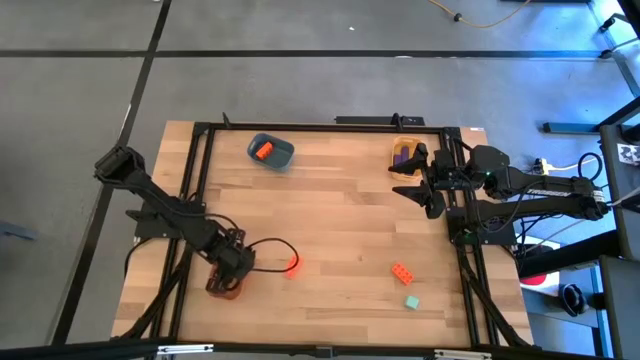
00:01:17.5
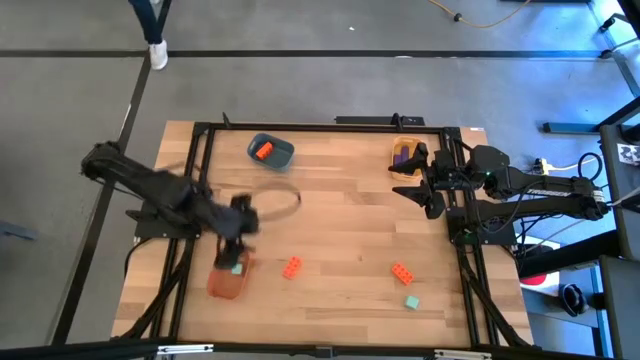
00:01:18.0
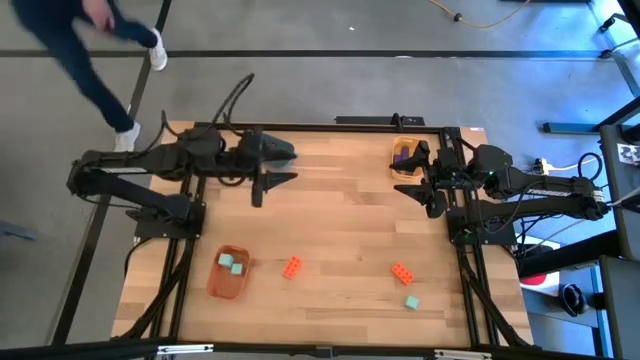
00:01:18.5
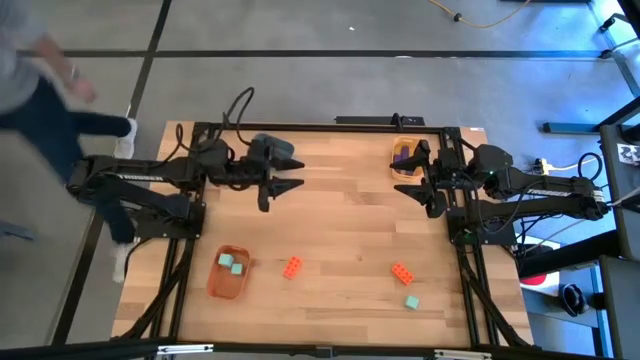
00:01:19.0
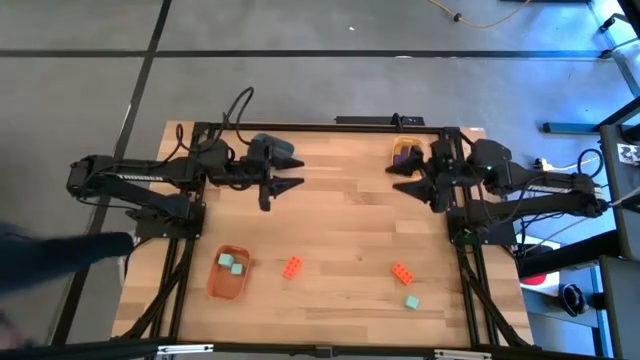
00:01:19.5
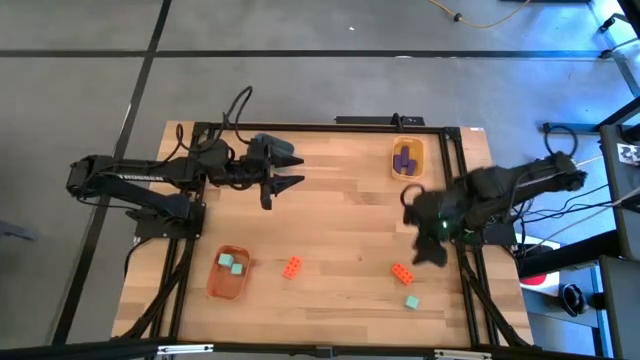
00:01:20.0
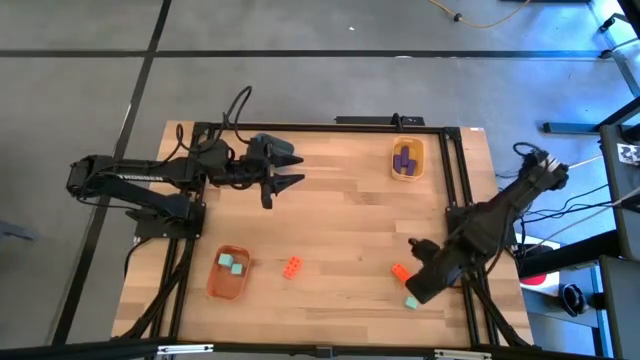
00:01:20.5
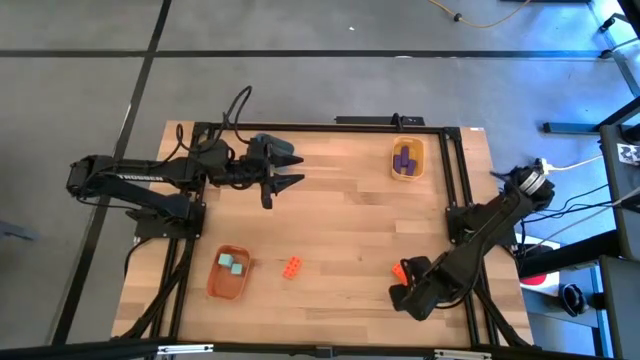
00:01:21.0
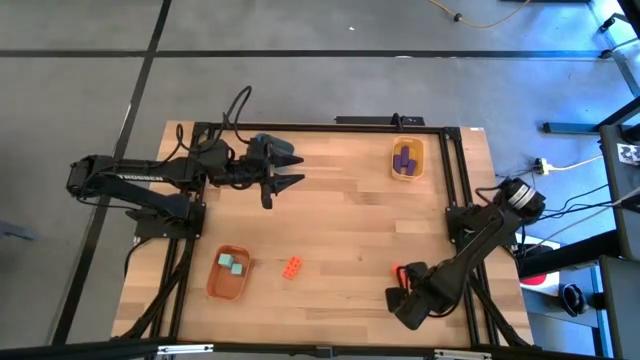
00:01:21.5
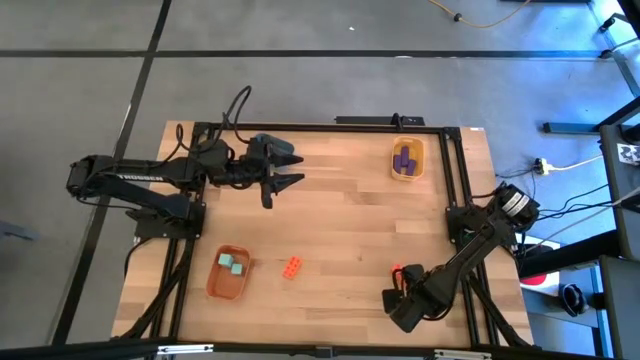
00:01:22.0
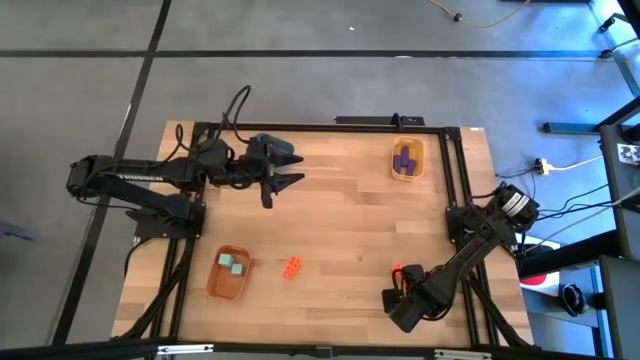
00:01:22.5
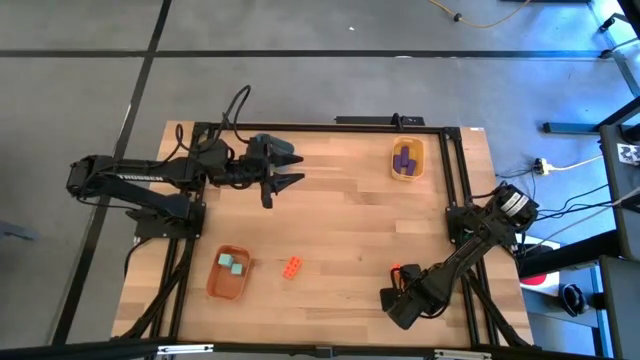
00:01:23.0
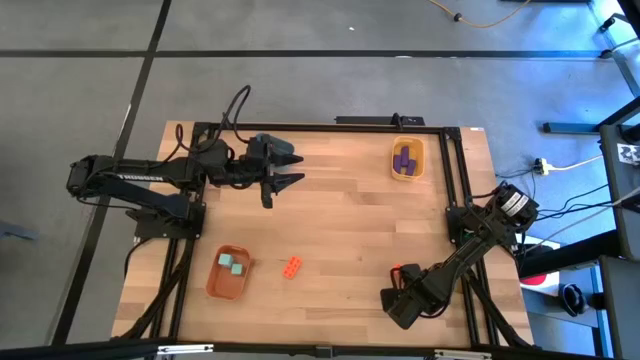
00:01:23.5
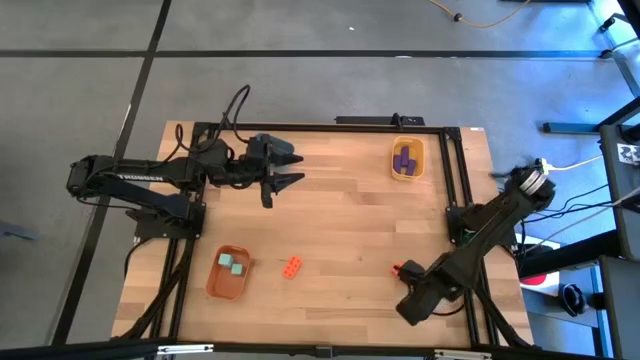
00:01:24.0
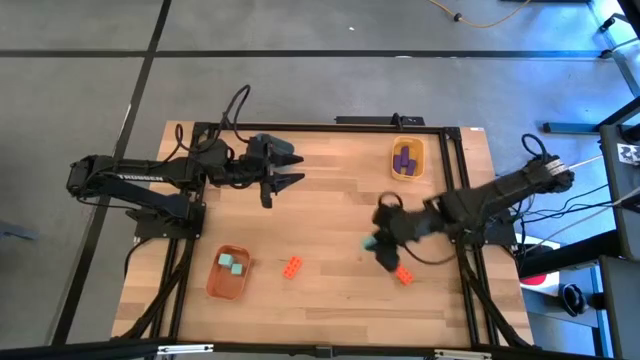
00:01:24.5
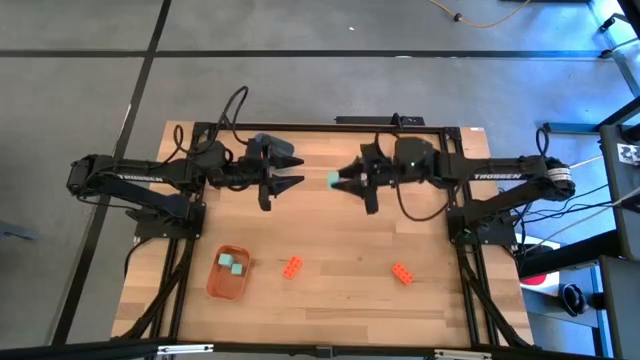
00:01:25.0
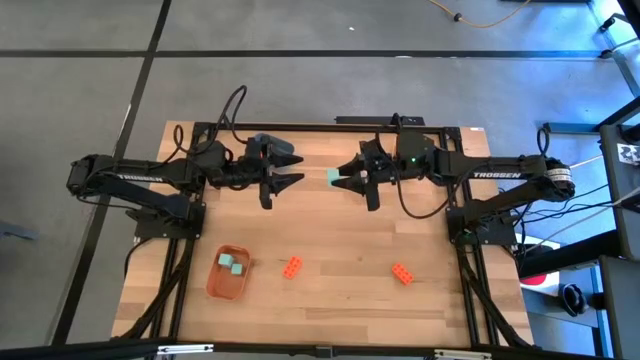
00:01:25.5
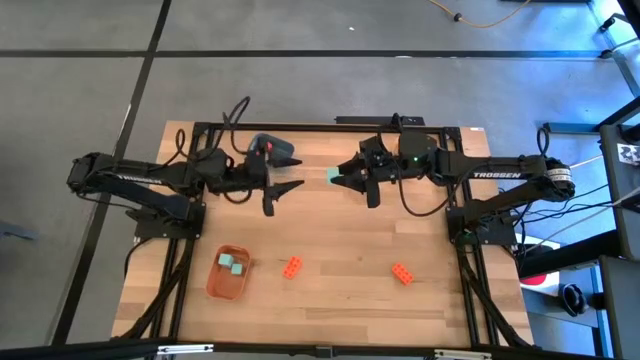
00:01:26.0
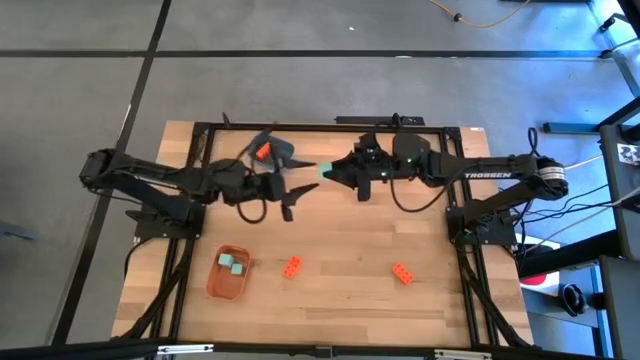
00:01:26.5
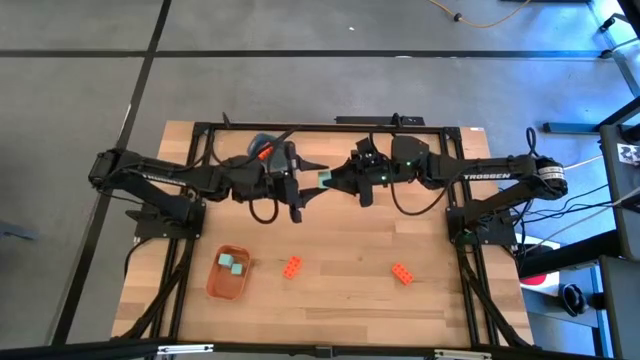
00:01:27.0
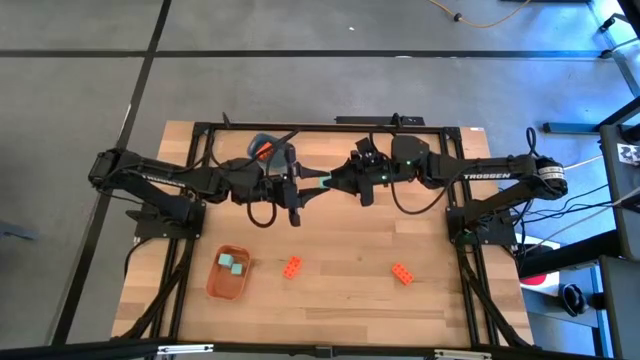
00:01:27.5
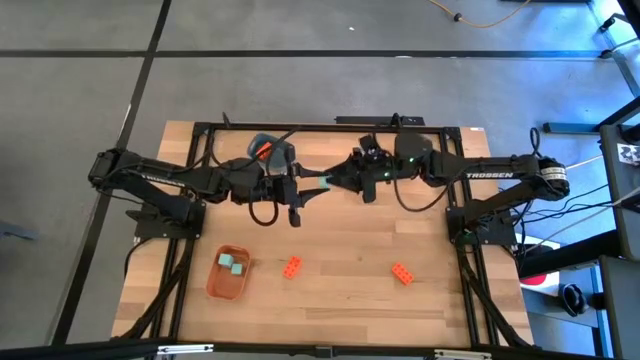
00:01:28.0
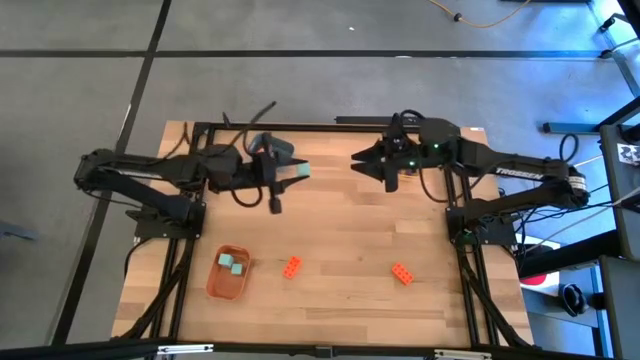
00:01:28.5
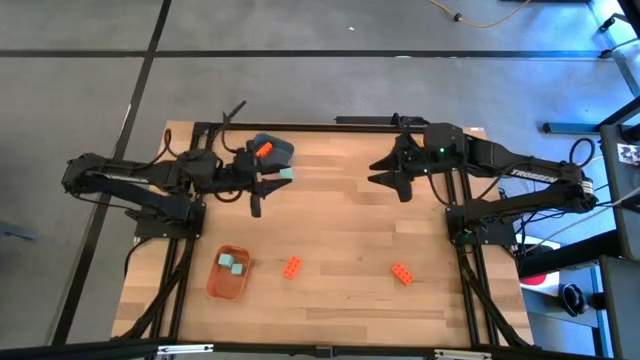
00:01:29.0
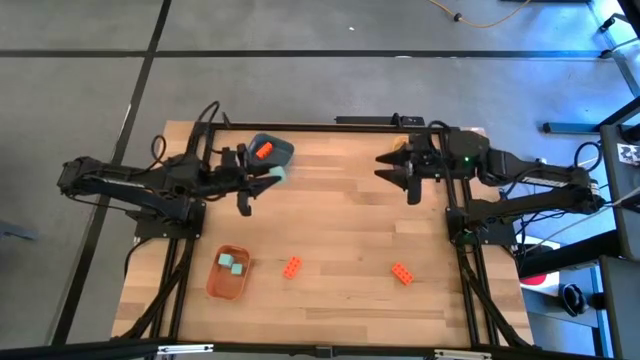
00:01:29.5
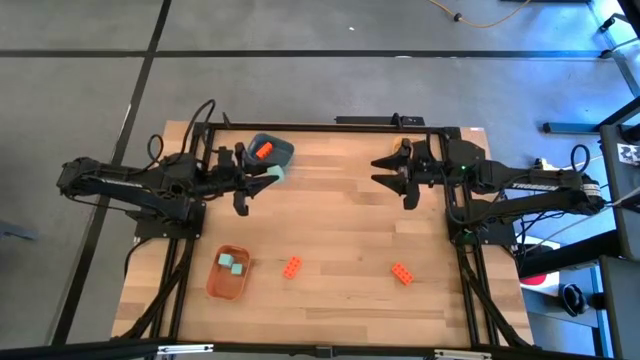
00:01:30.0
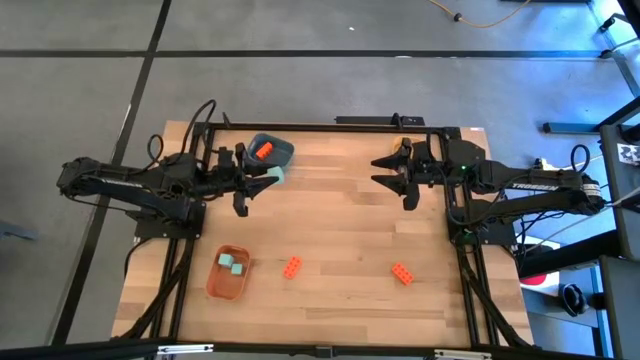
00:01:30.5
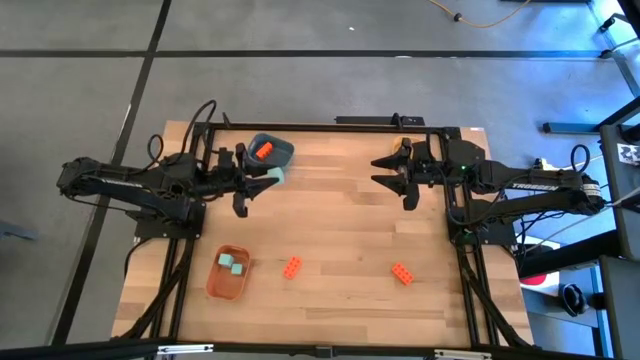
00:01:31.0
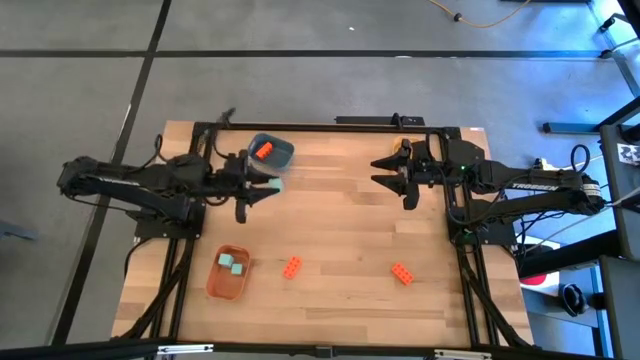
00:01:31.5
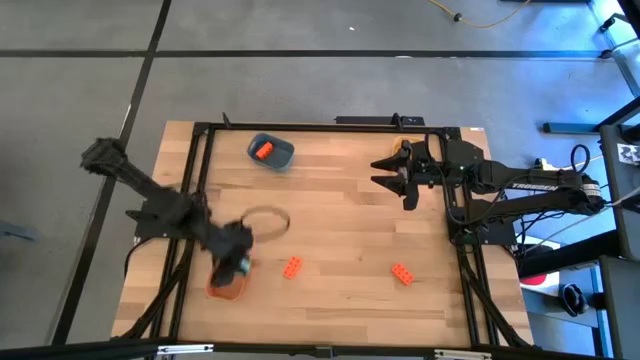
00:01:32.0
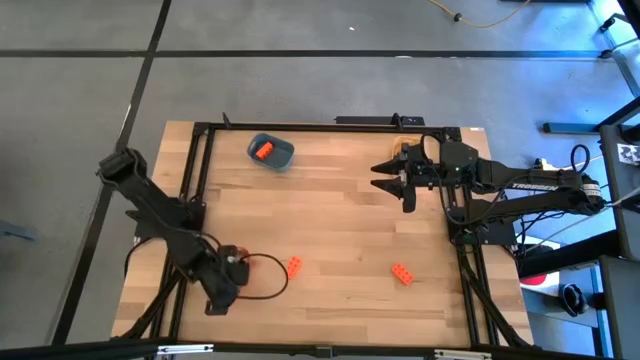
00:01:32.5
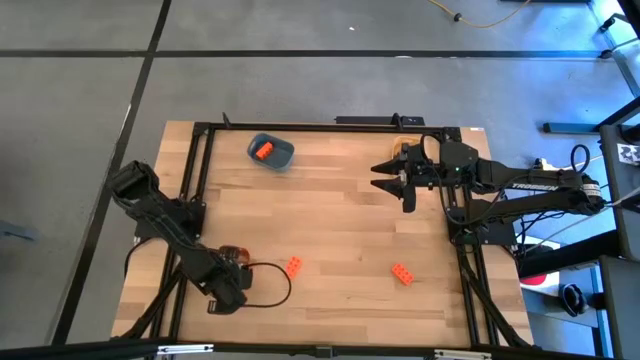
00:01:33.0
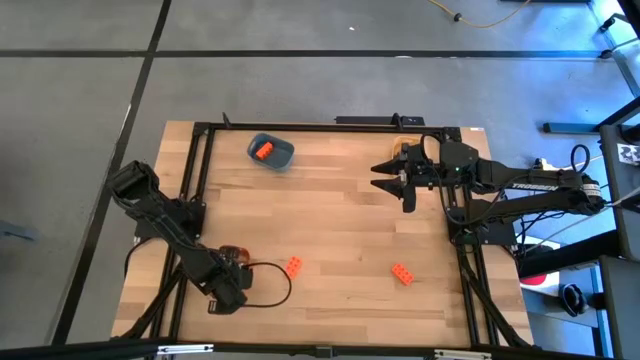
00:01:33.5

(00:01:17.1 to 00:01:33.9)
Task: Sort & place blocks by color
Put the light blue block into the orange bin

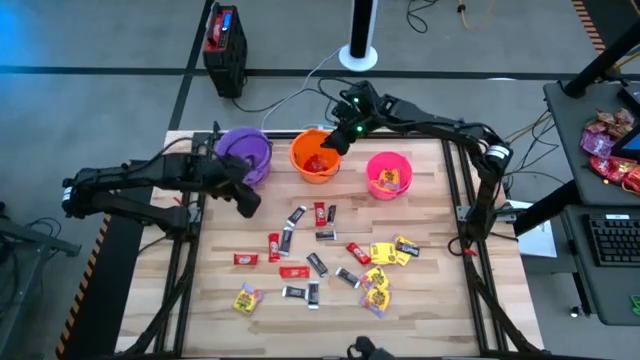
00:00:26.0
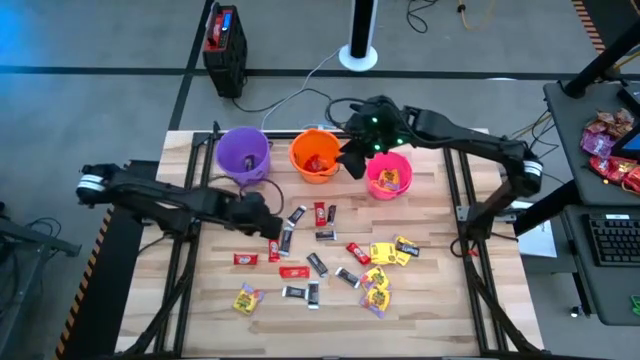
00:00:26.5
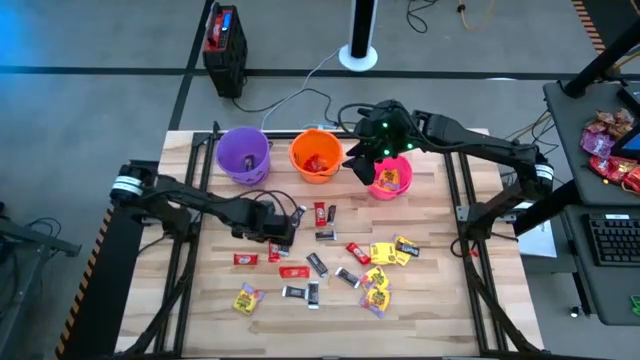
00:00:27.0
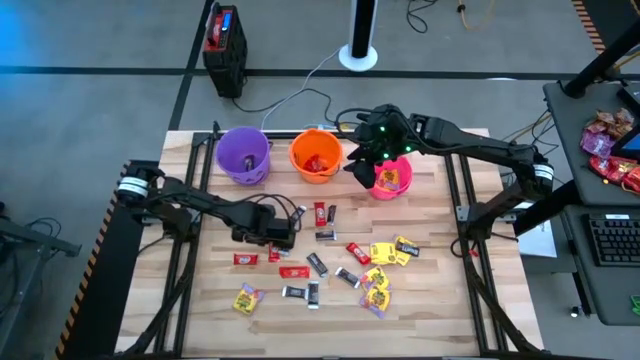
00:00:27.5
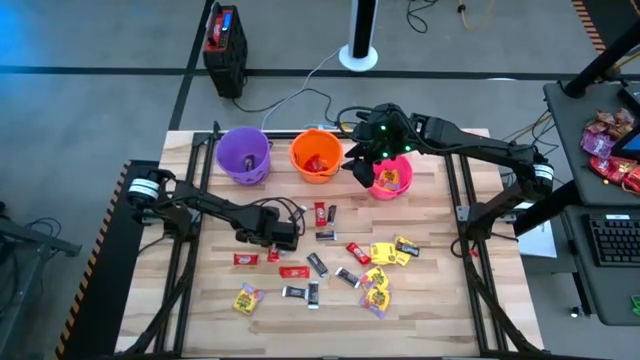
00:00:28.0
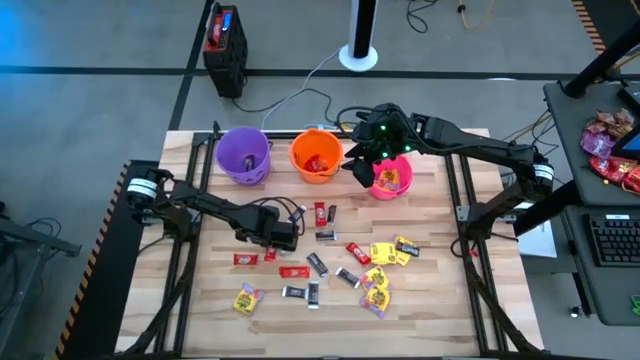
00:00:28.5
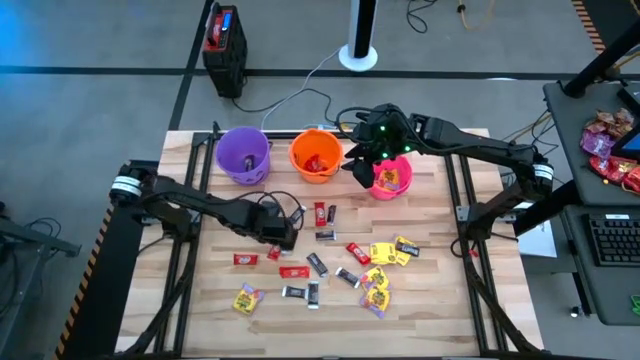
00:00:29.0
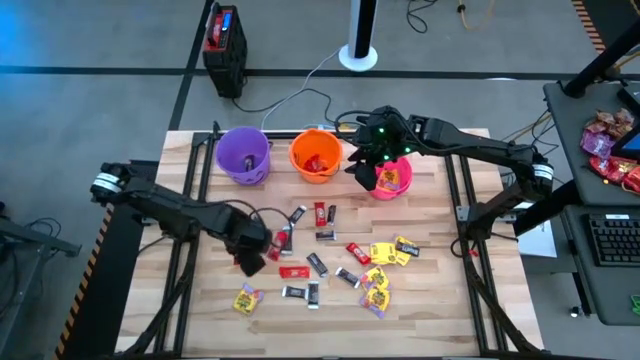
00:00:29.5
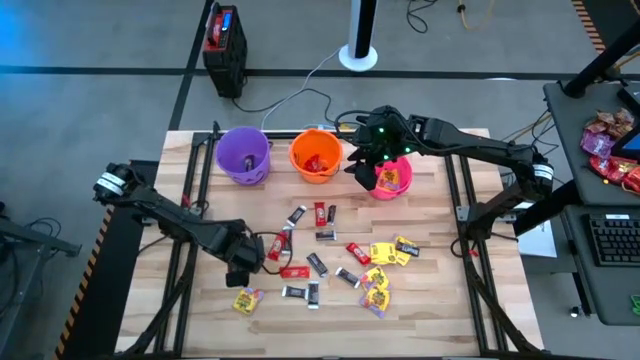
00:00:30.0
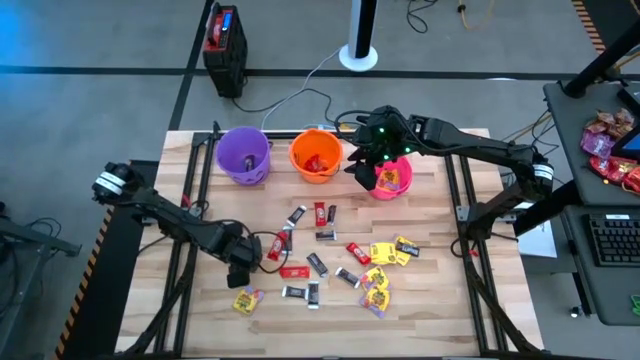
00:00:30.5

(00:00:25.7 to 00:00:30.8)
Task: Sort candy by brand, put in halloween buckets
Put the red candy into the orange bucket
